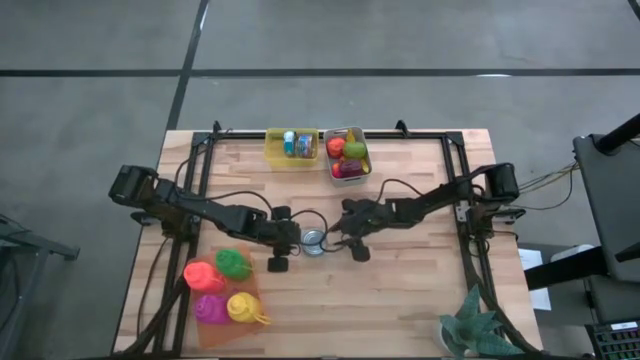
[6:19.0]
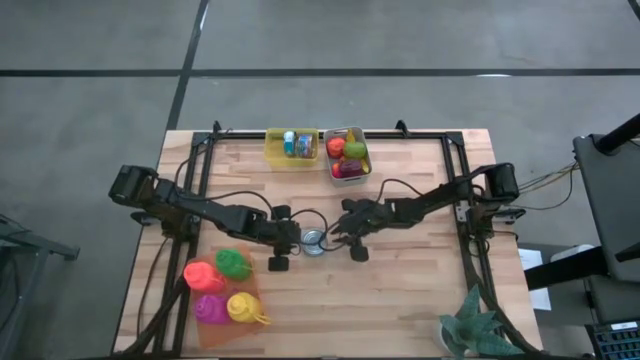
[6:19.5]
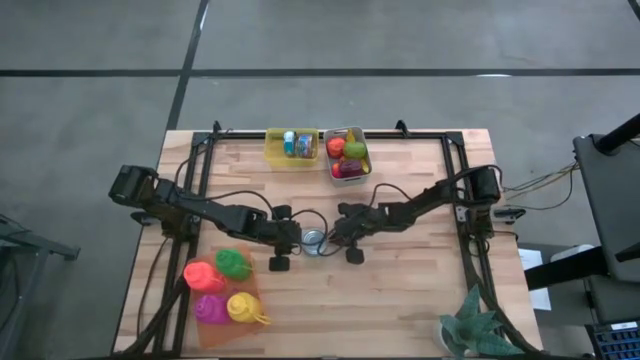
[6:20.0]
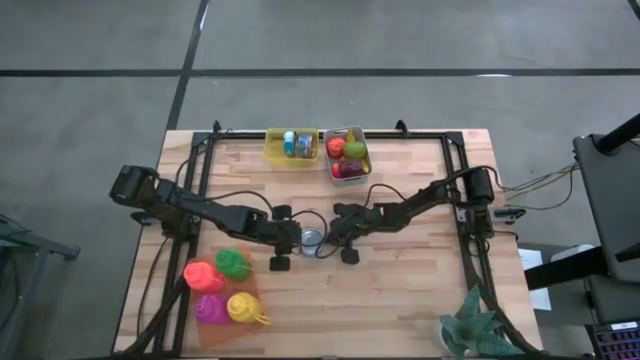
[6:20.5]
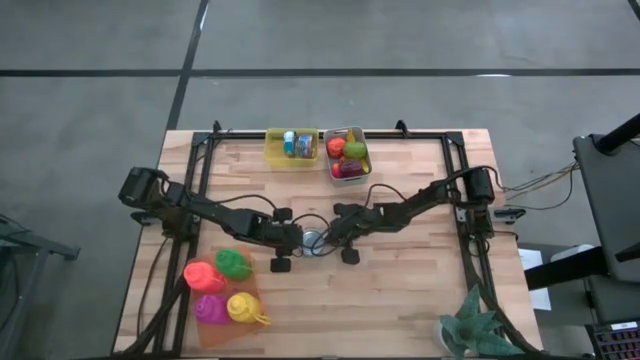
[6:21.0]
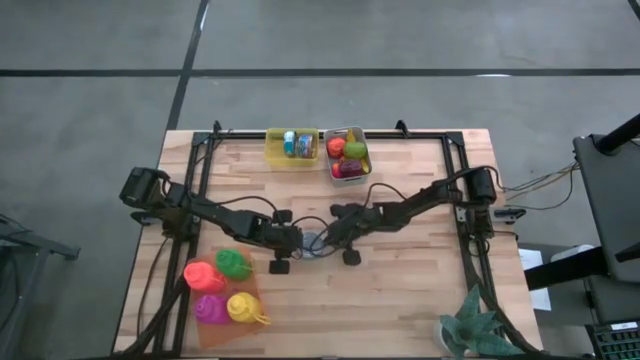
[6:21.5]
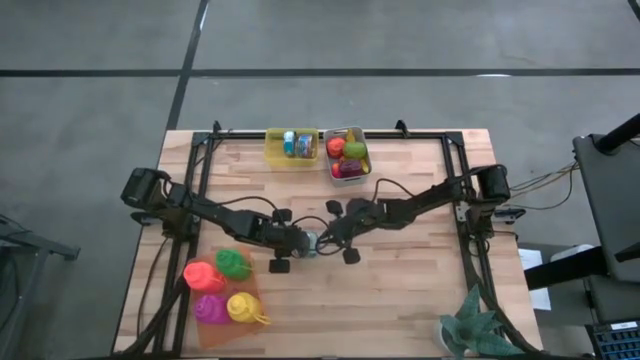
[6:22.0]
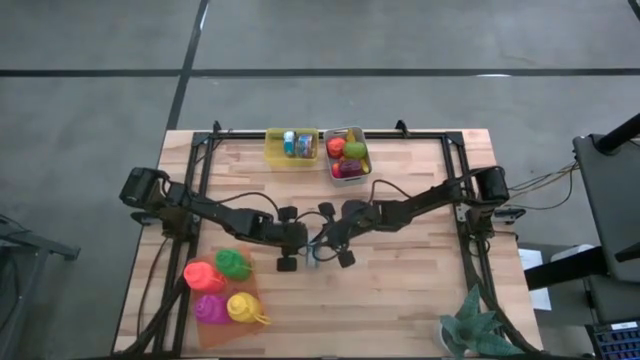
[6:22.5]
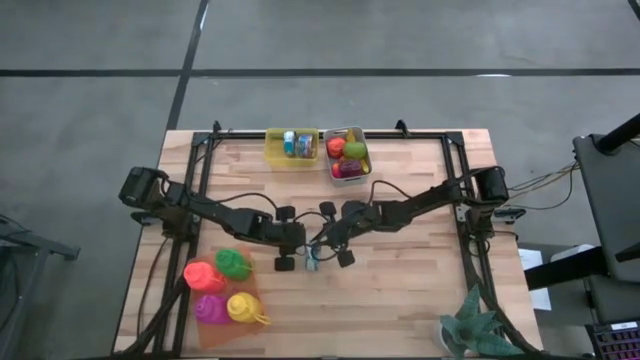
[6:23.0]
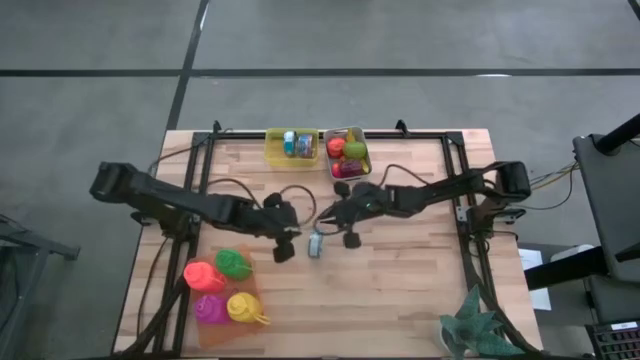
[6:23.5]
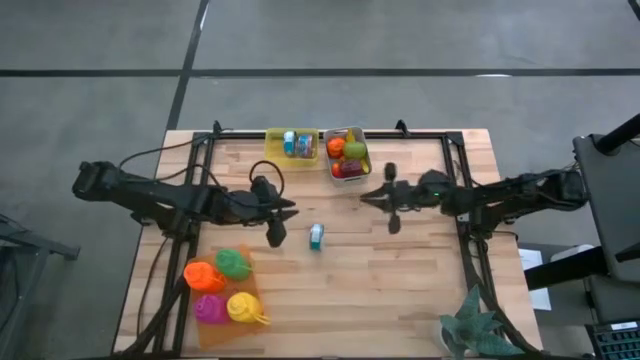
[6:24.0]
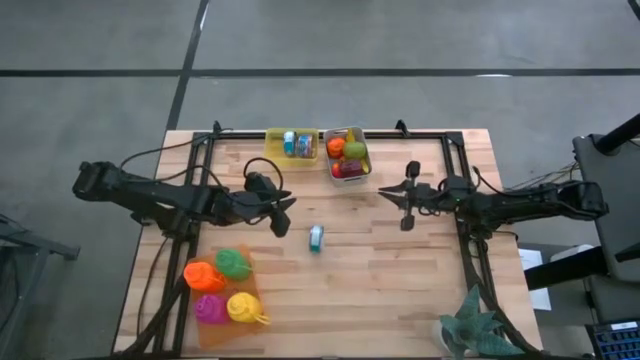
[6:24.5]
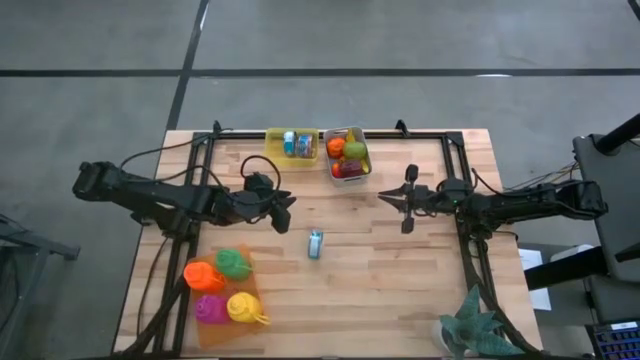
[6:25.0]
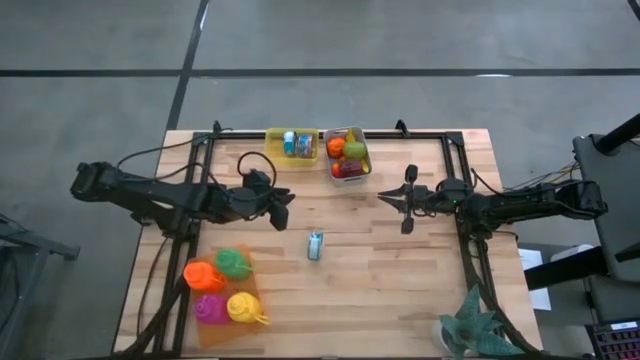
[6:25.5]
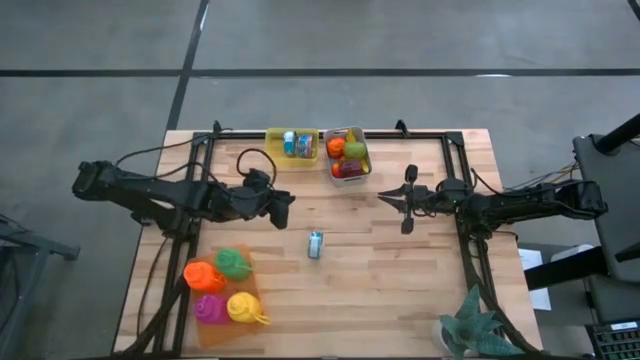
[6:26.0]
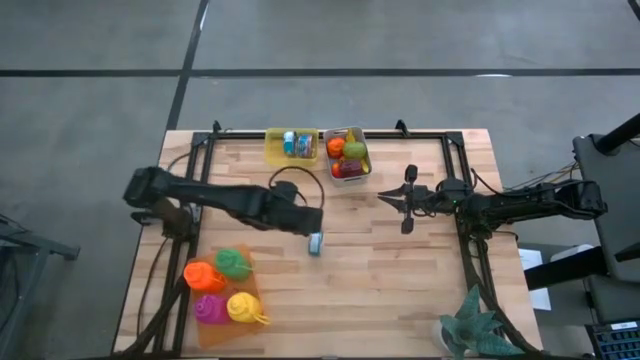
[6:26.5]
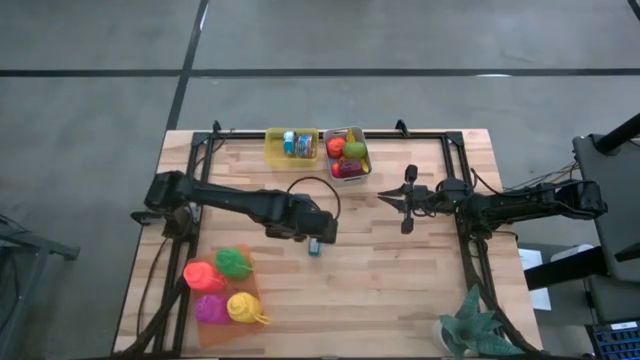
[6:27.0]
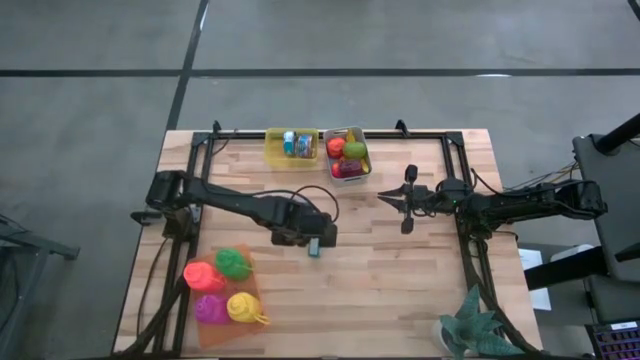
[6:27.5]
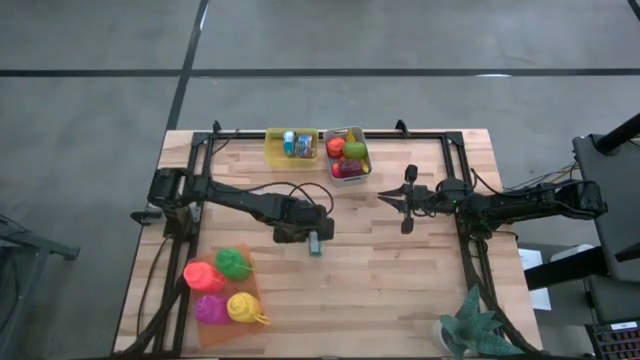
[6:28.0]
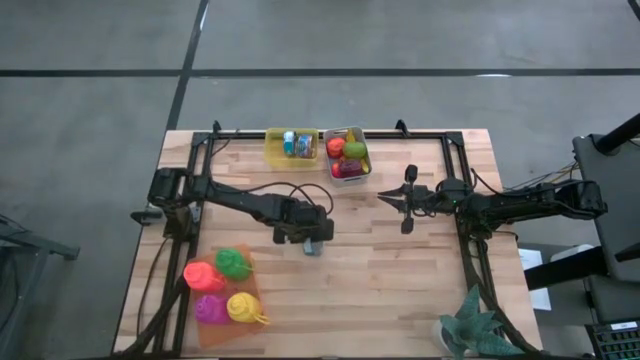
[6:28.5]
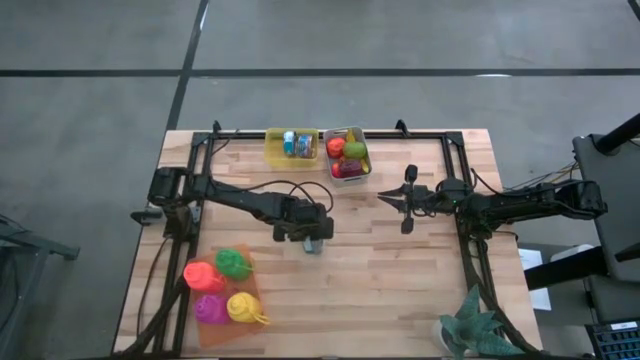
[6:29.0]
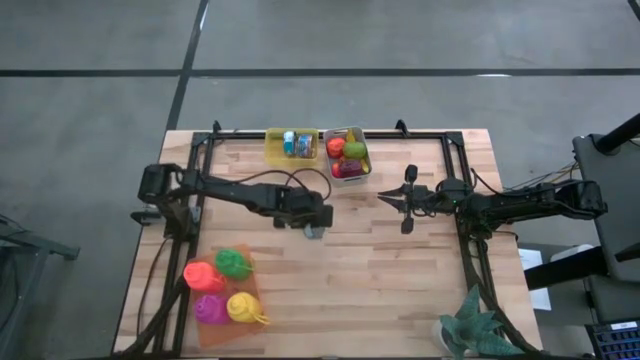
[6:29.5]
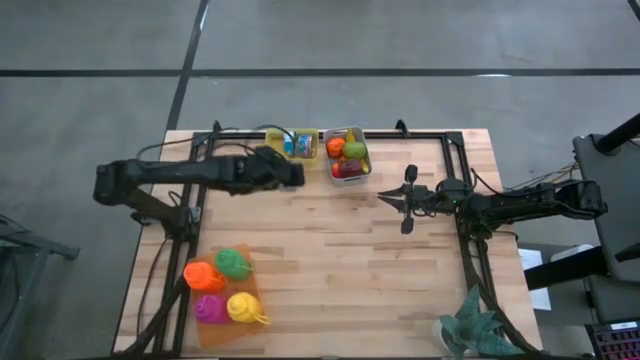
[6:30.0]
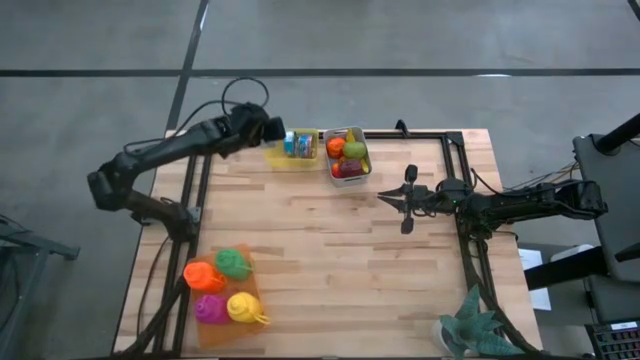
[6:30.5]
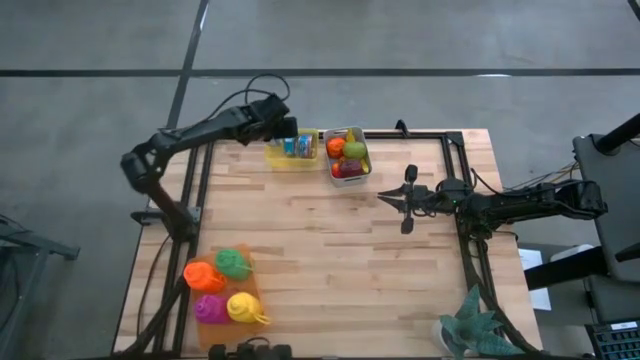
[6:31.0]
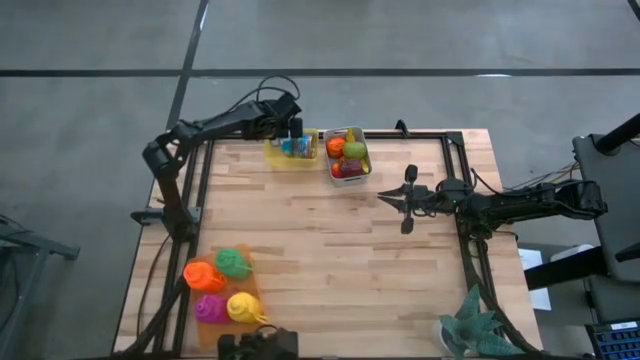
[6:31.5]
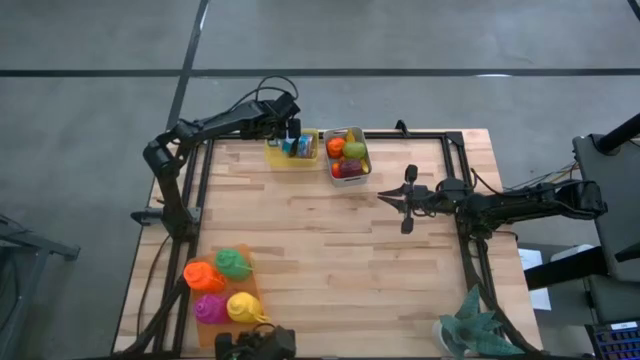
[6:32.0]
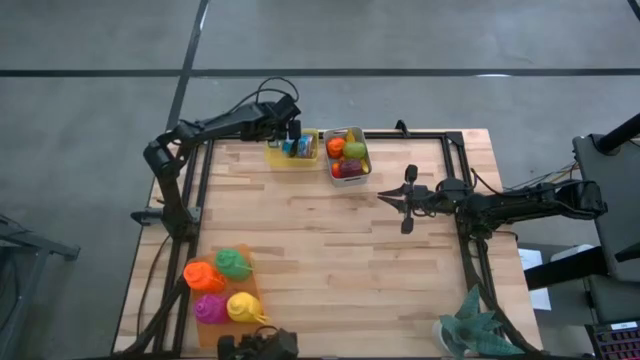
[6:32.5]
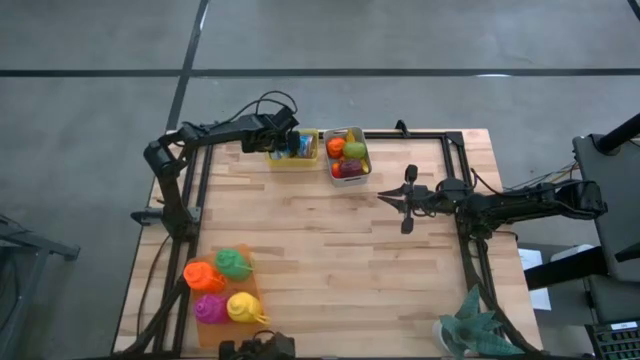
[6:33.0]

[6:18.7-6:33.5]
Task: Pick & Place Food Item
Put the blue tuna can into the yellow bin

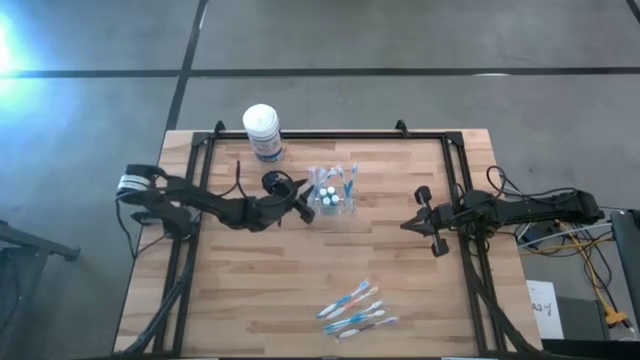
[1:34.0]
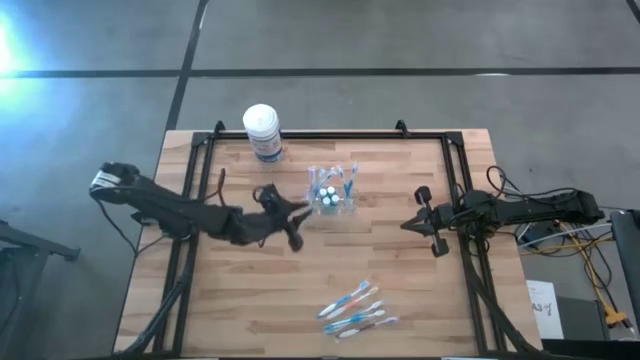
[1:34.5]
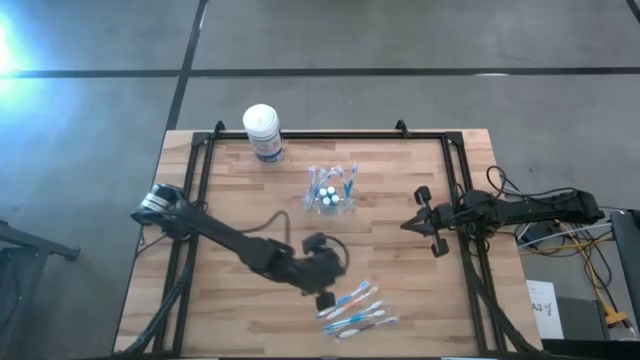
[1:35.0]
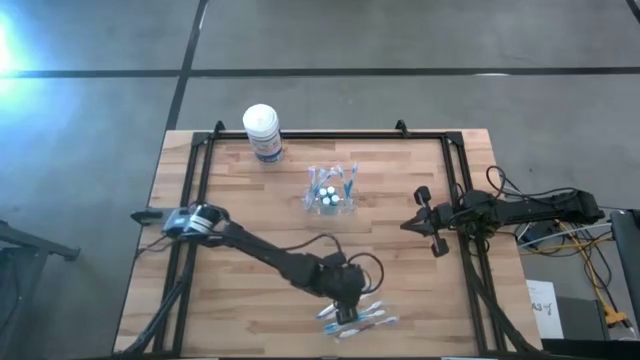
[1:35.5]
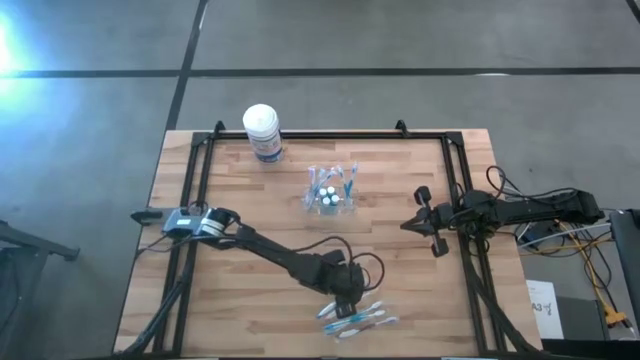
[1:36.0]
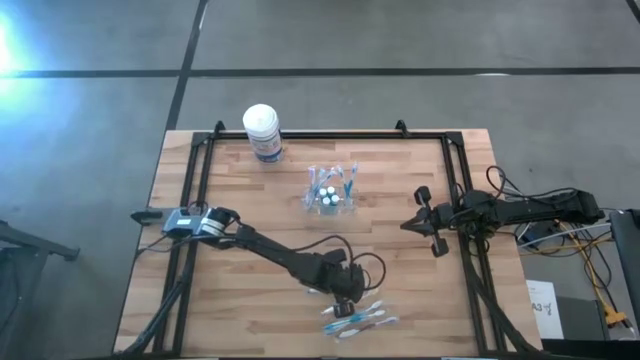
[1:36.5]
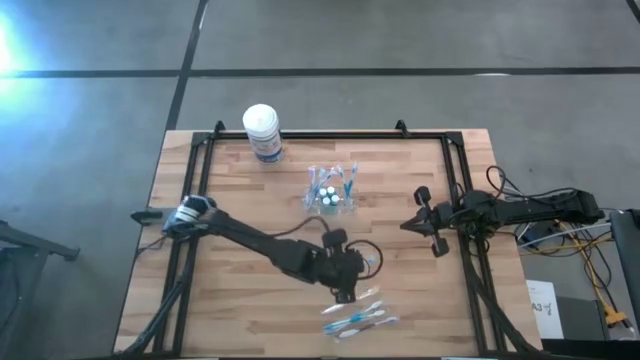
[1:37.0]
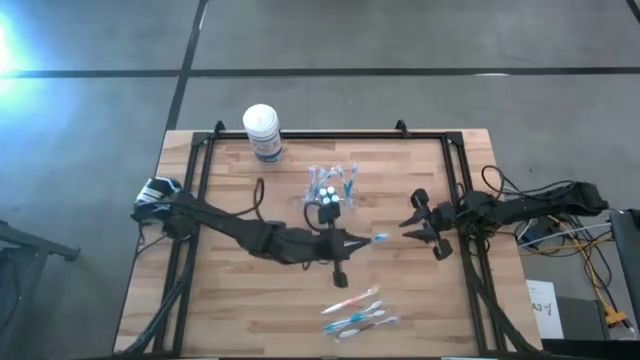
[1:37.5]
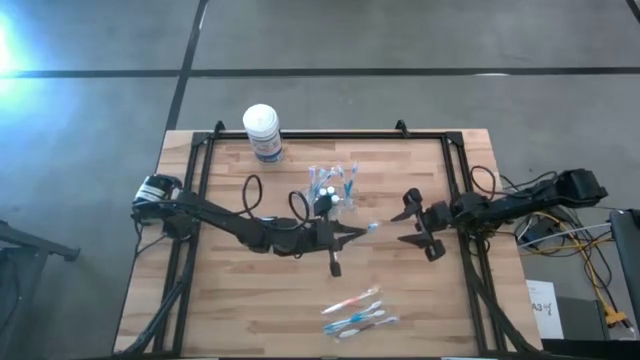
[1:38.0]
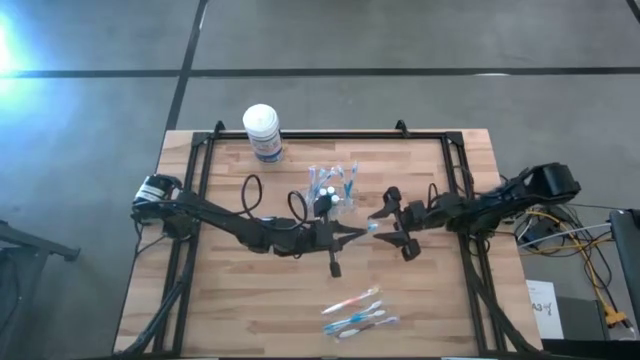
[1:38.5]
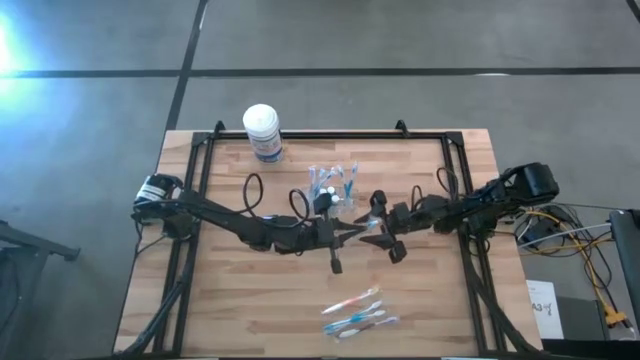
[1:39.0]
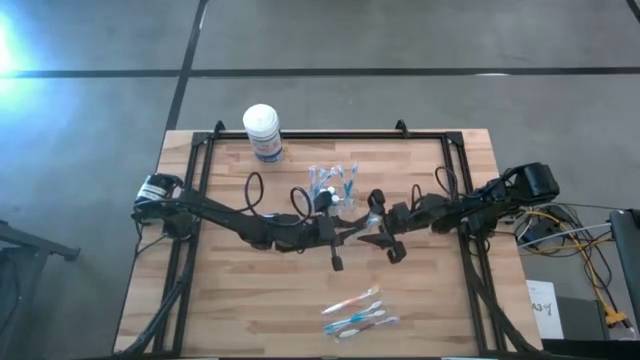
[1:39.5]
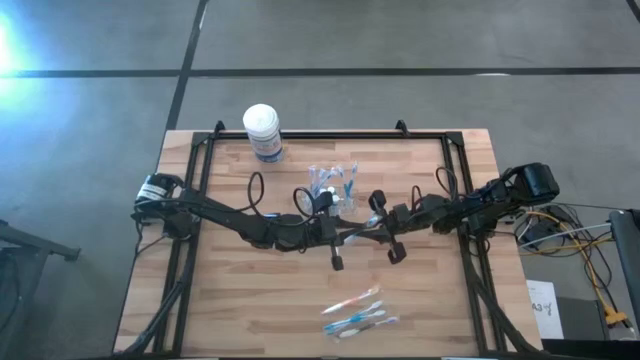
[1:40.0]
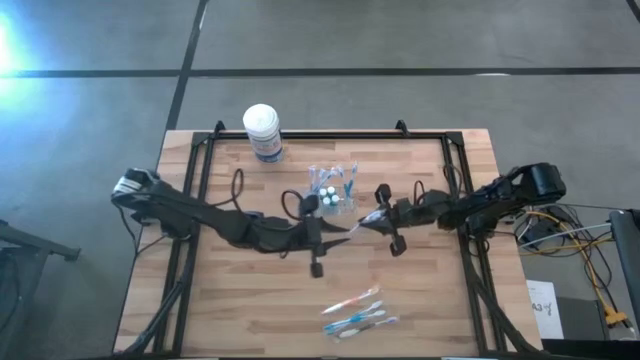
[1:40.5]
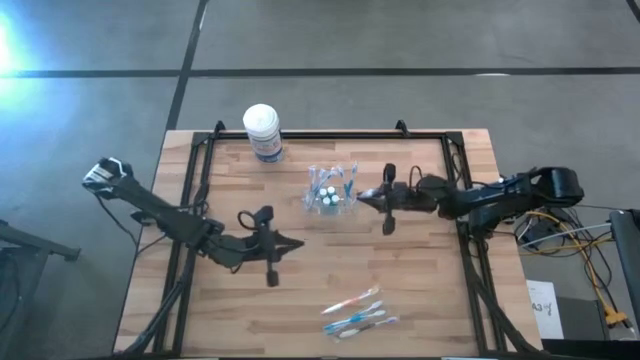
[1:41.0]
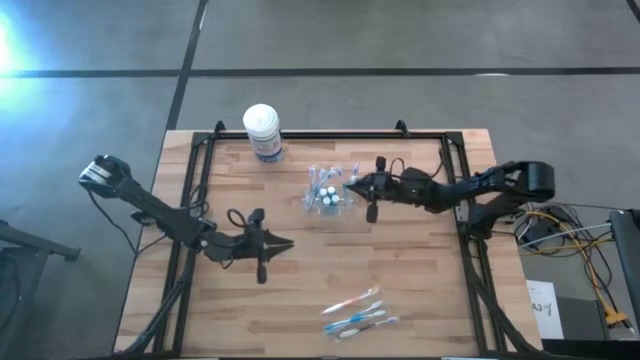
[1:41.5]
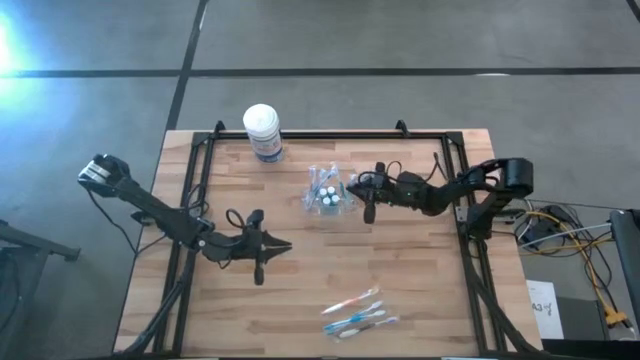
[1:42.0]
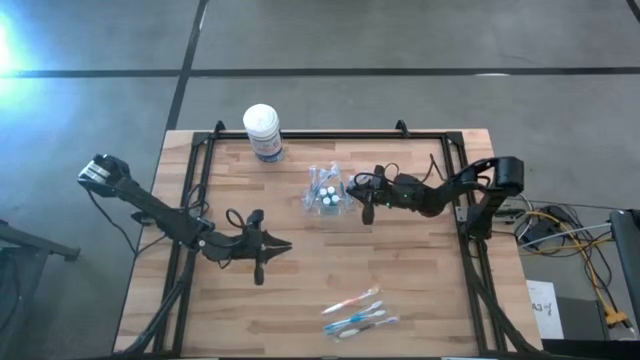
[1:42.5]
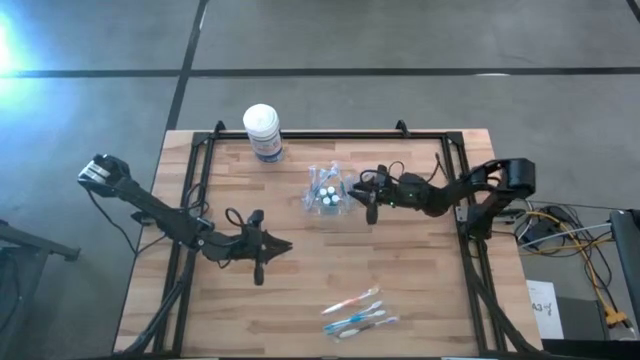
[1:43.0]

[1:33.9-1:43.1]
Task: Pick & Place toothbrushing station
Put the blue toothbrush into the transparent organizer
